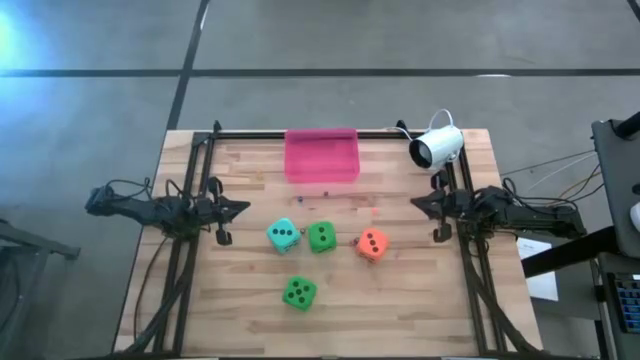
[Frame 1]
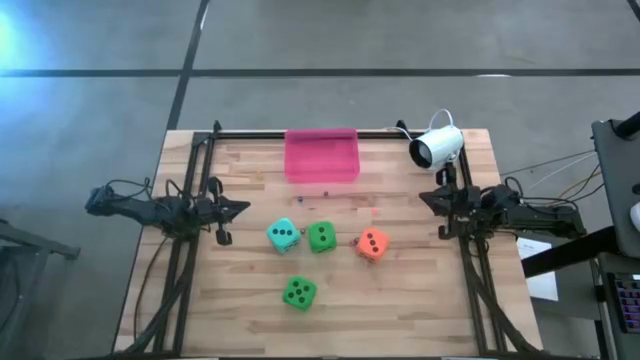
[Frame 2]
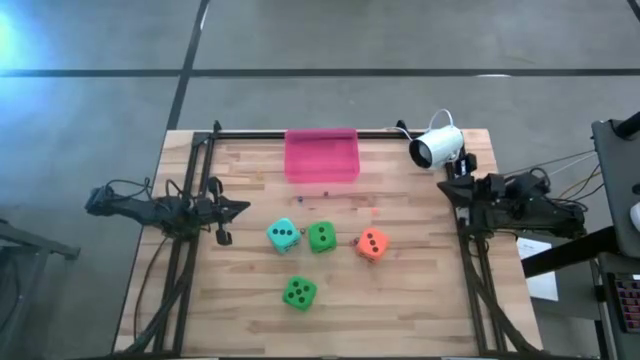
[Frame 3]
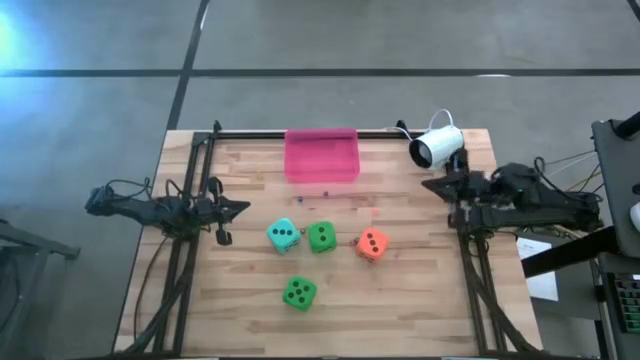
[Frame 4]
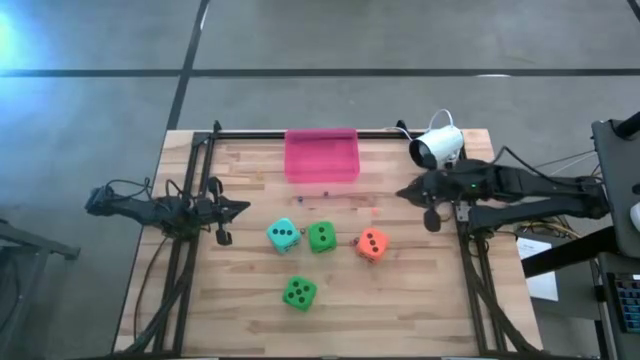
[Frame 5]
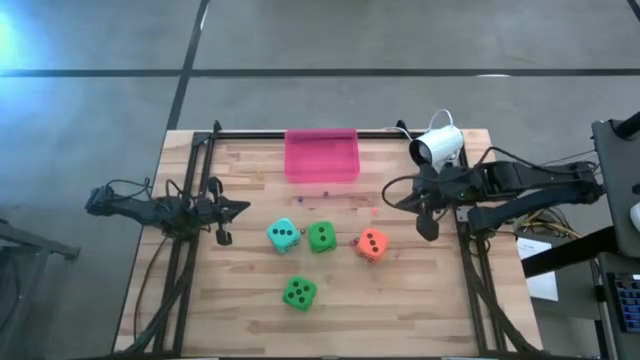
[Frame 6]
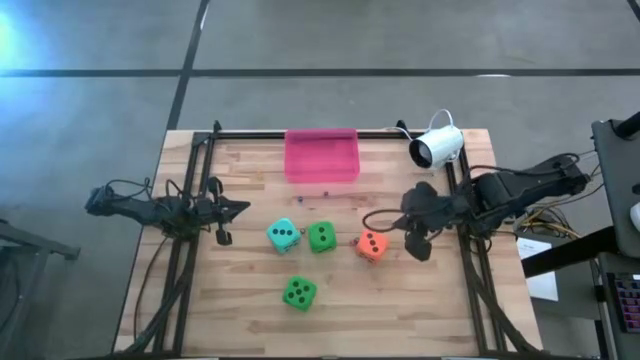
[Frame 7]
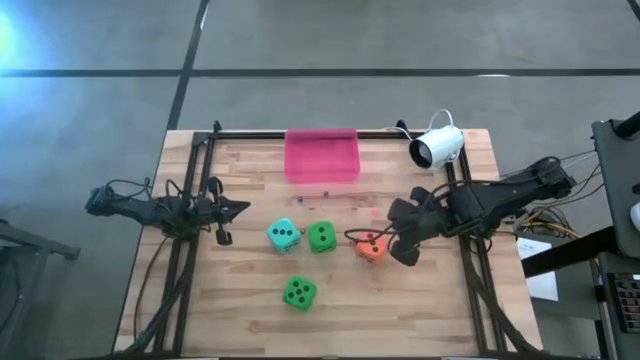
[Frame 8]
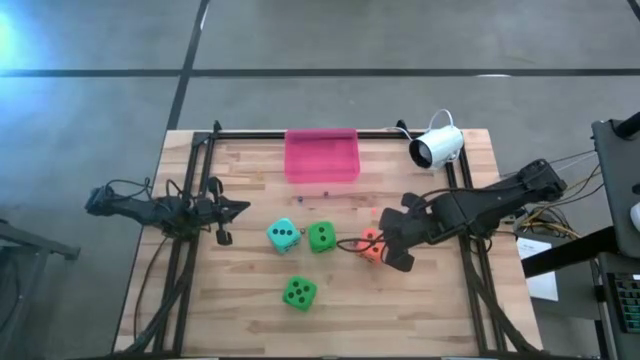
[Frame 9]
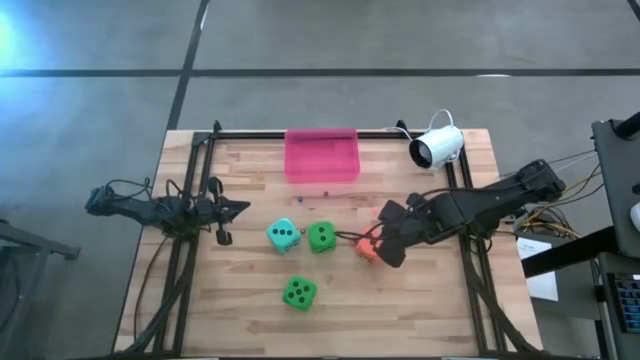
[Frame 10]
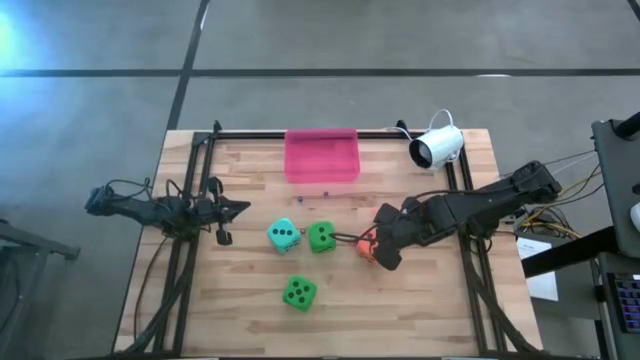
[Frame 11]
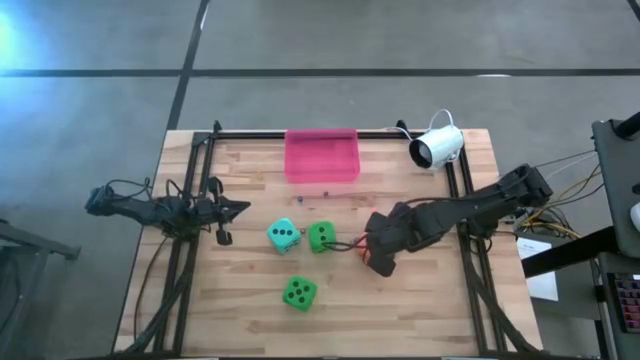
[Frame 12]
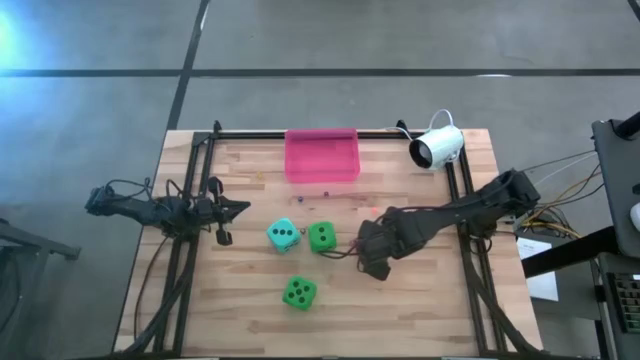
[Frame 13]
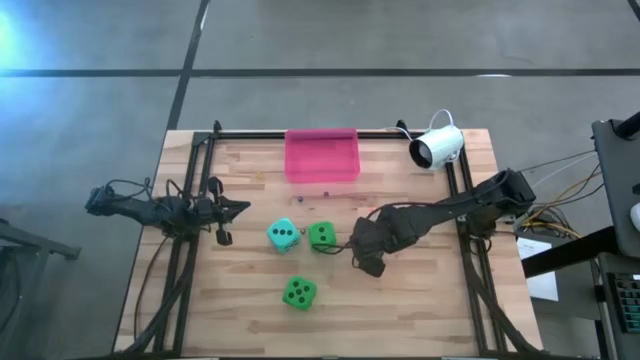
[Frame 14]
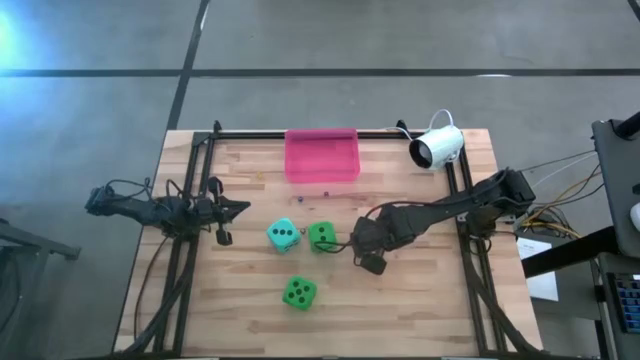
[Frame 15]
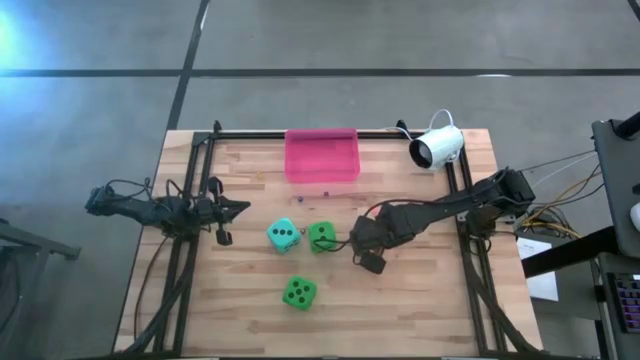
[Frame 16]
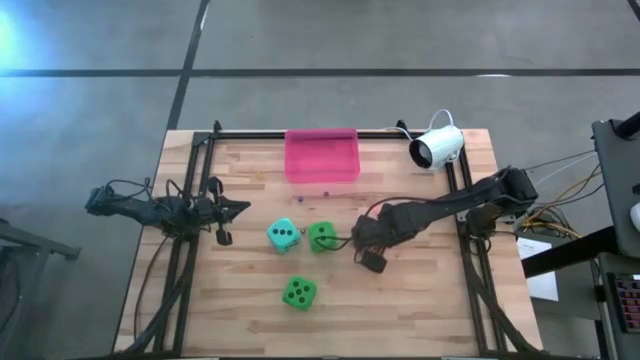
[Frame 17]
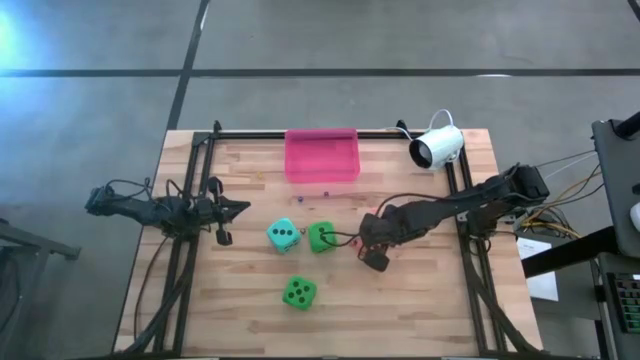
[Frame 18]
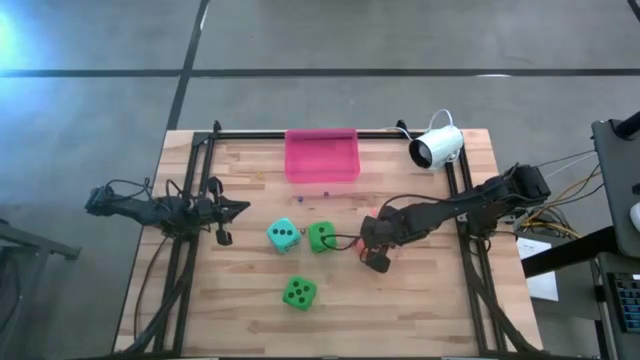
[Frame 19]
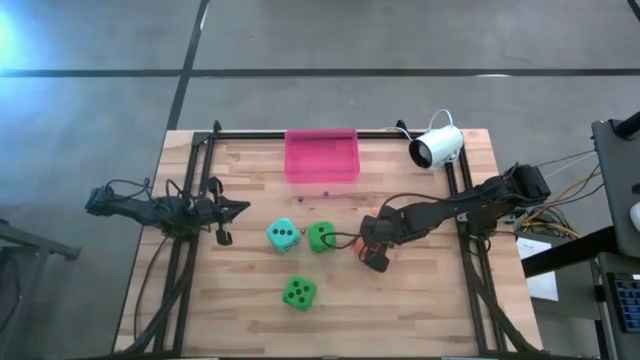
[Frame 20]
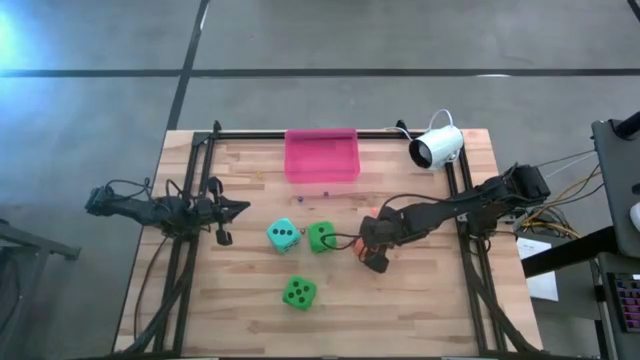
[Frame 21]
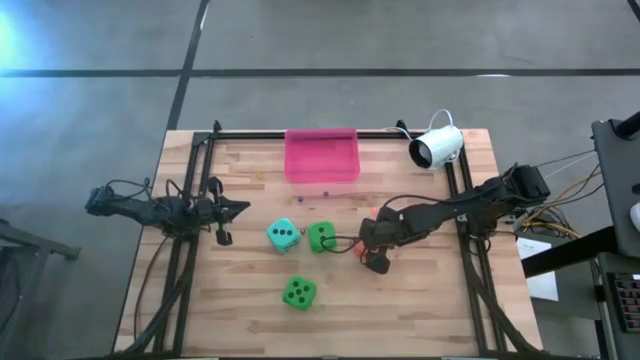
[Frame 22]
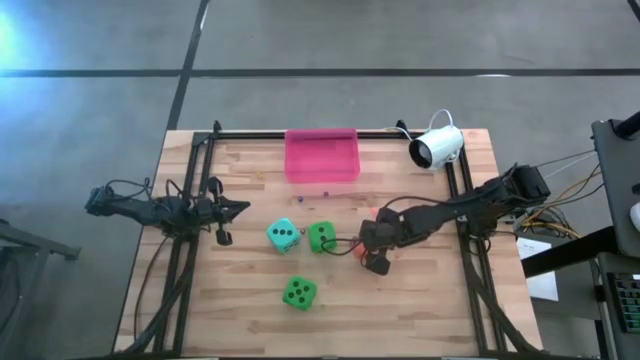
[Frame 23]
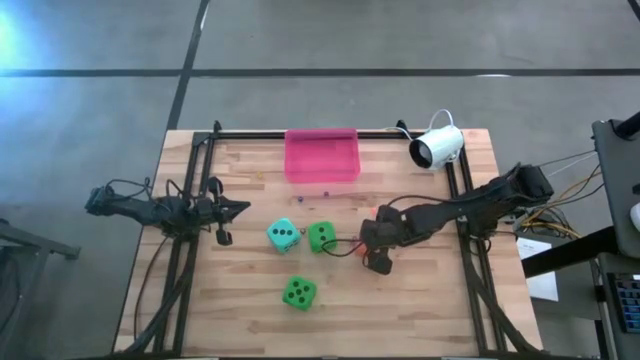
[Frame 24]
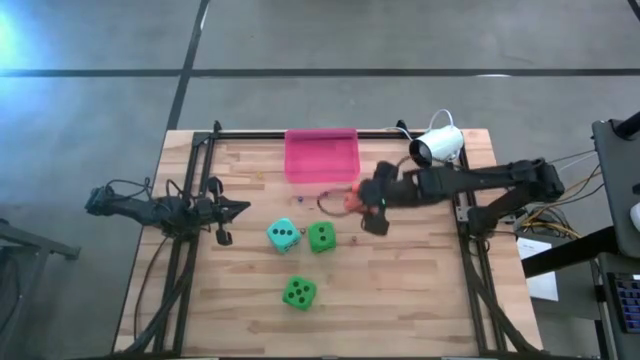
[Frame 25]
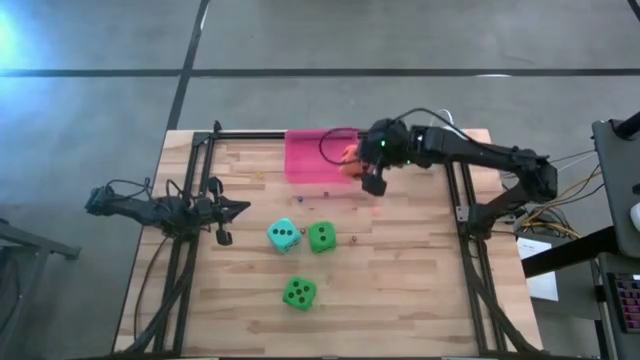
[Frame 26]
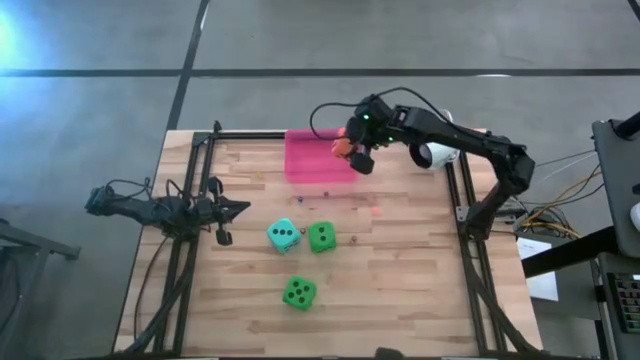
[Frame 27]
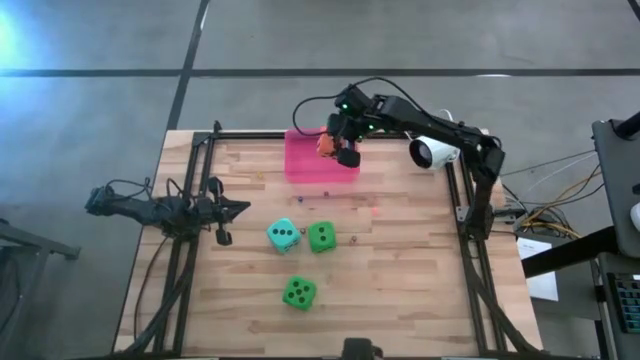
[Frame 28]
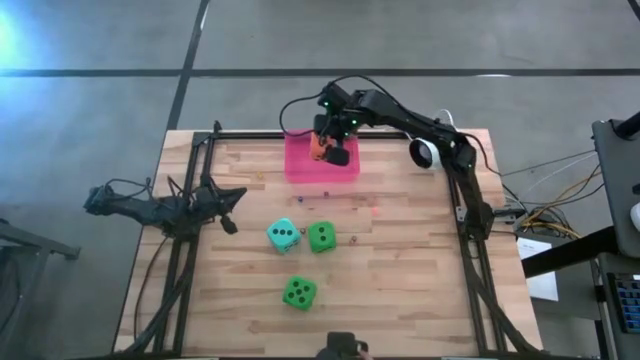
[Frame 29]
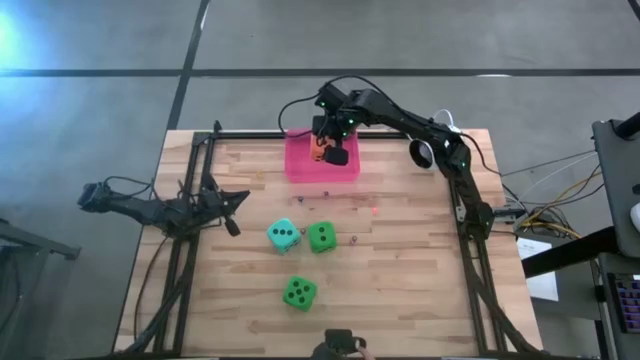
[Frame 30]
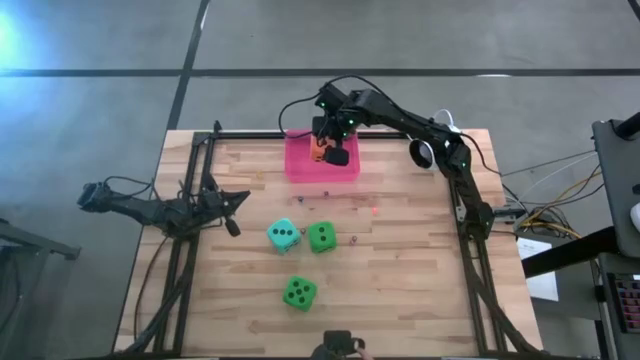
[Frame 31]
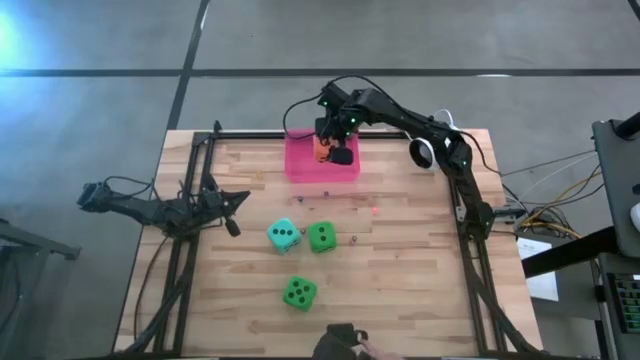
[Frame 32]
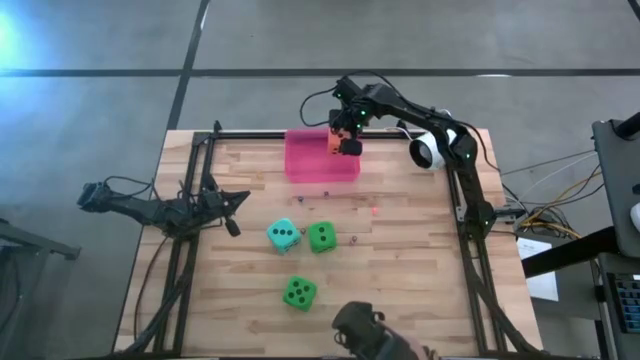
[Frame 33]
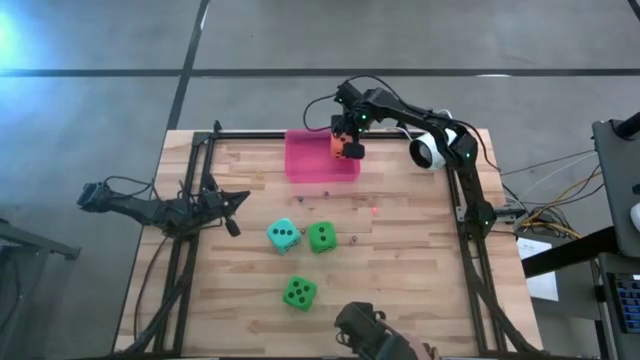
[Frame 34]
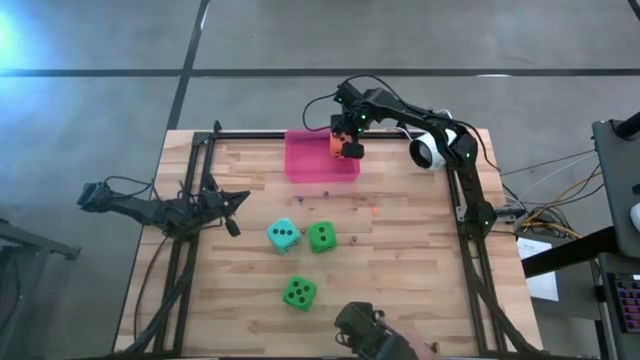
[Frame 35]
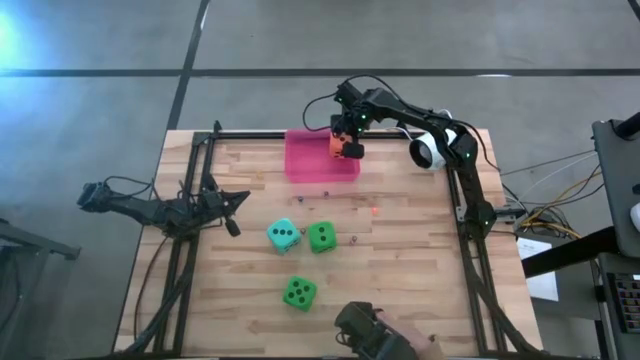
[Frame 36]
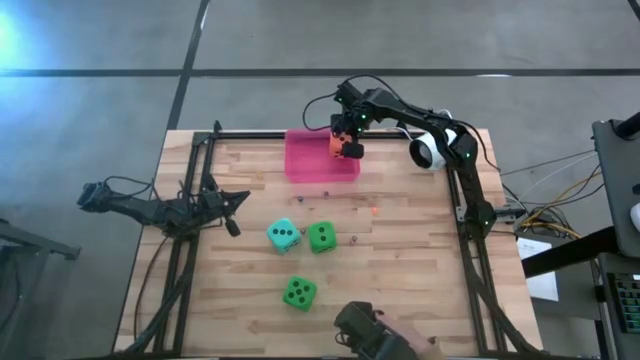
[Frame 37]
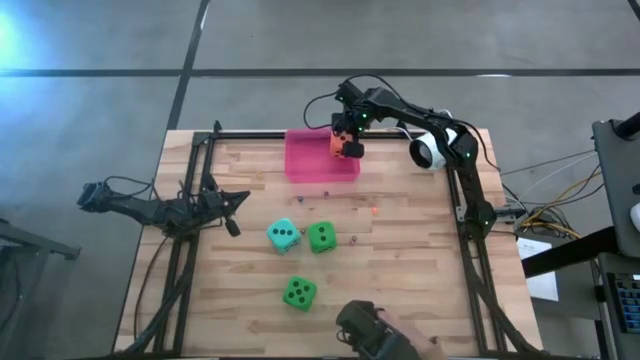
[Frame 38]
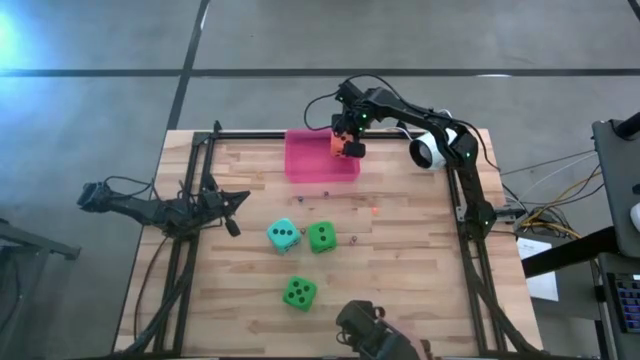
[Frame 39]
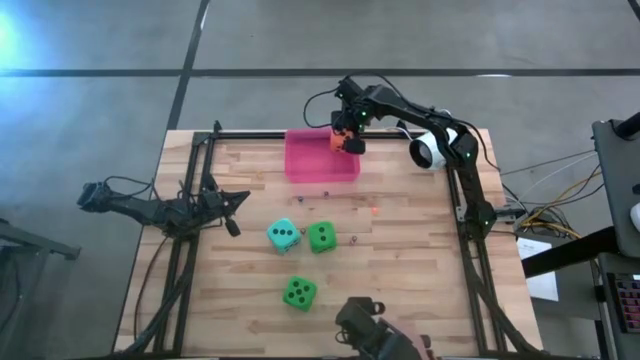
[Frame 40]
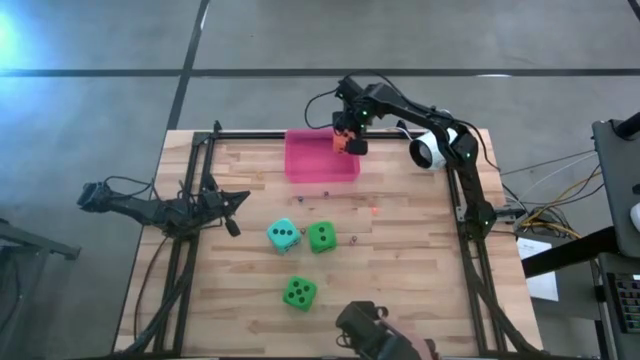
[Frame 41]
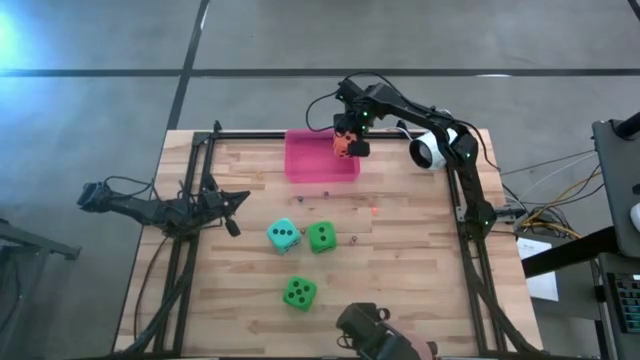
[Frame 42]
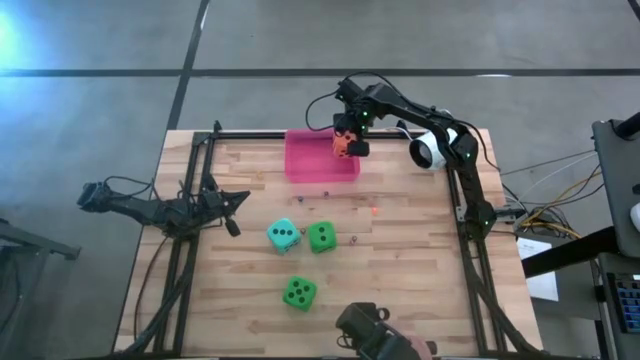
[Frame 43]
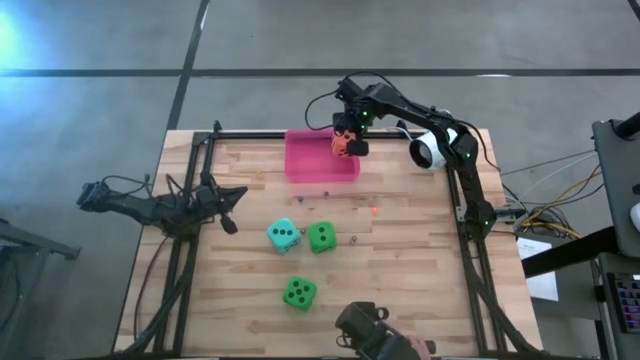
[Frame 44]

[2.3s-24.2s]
Task: Pick & Place Dice
Put the large orange dice into the pink bin
